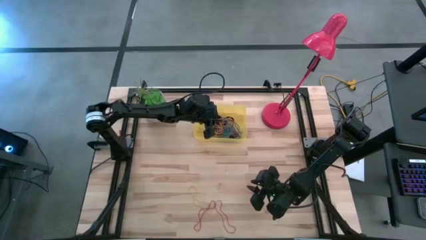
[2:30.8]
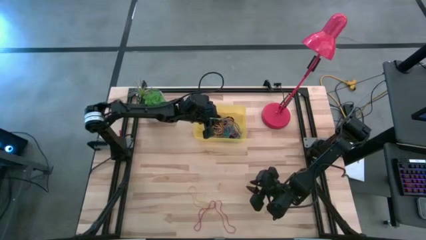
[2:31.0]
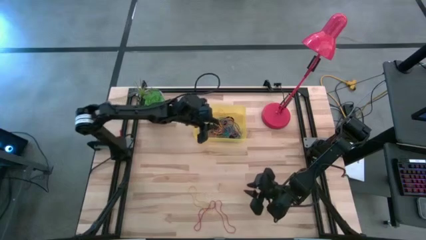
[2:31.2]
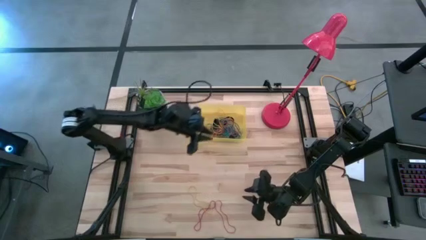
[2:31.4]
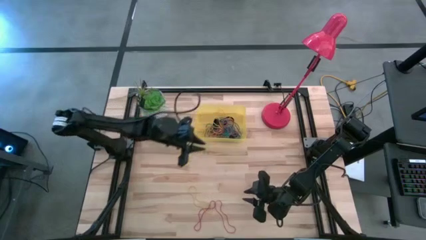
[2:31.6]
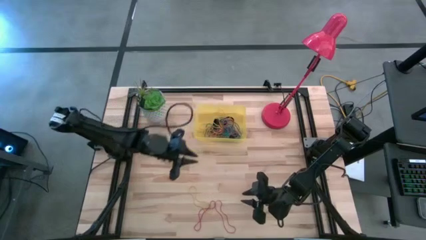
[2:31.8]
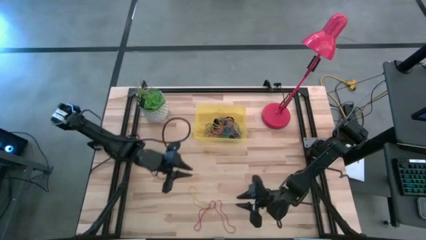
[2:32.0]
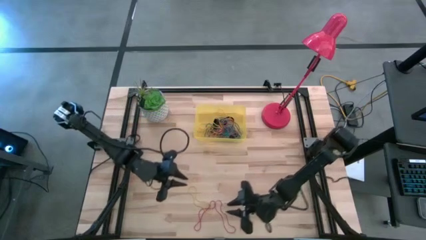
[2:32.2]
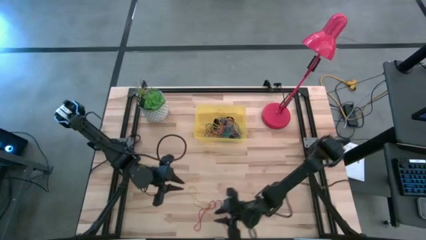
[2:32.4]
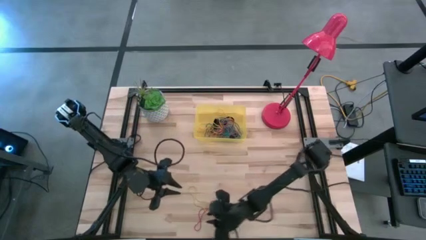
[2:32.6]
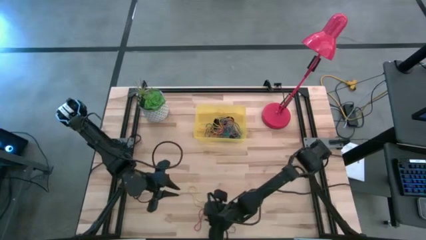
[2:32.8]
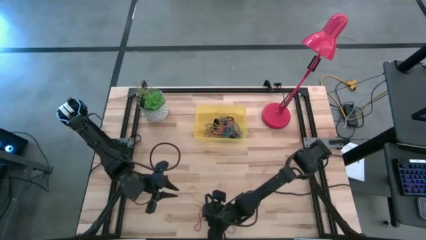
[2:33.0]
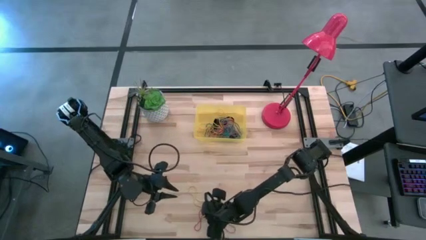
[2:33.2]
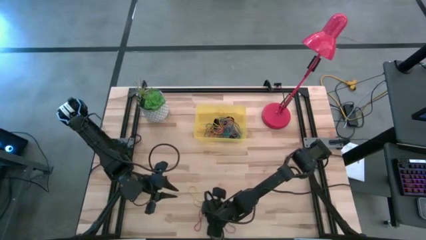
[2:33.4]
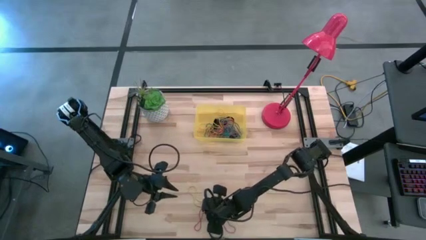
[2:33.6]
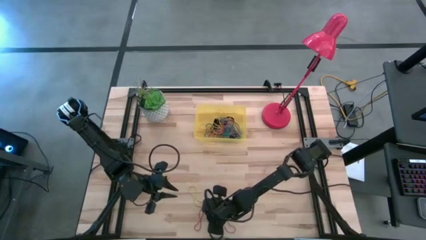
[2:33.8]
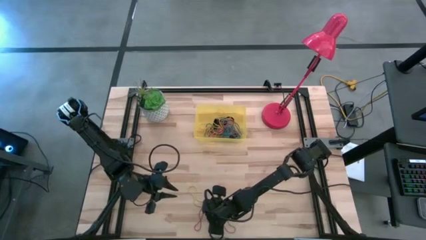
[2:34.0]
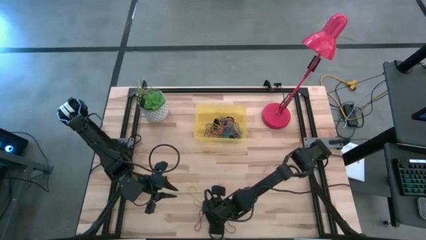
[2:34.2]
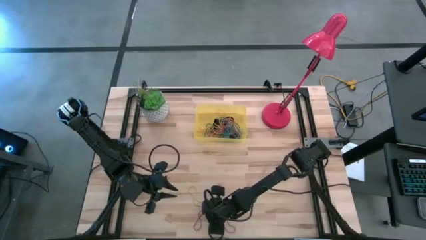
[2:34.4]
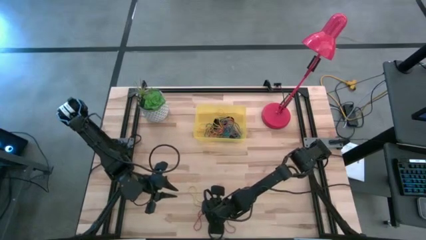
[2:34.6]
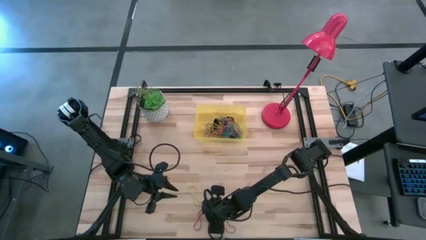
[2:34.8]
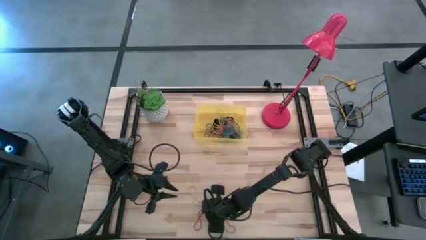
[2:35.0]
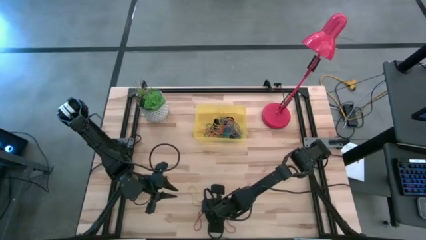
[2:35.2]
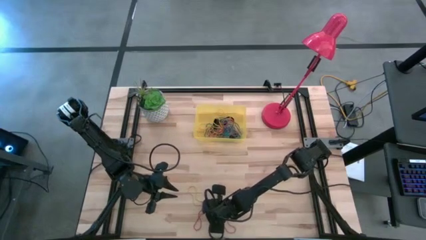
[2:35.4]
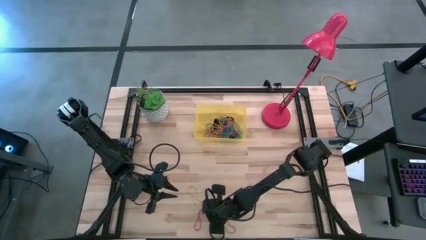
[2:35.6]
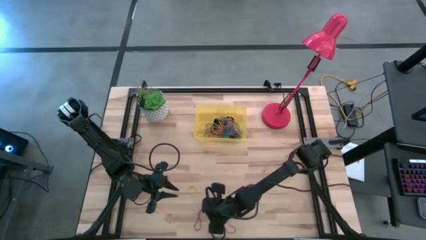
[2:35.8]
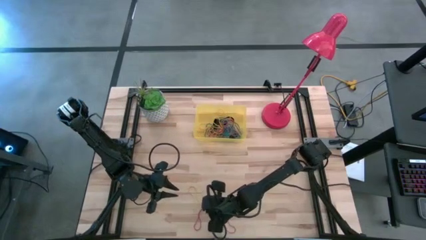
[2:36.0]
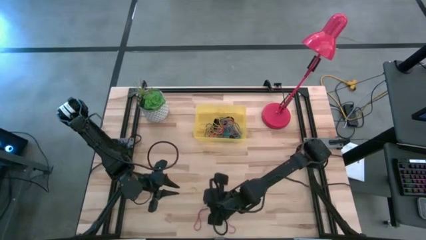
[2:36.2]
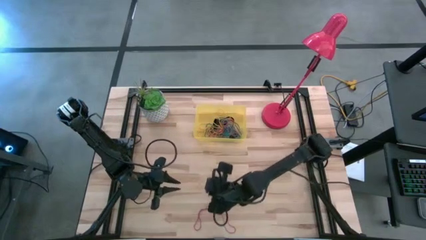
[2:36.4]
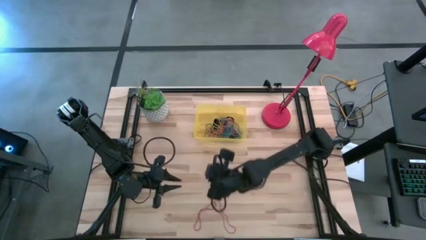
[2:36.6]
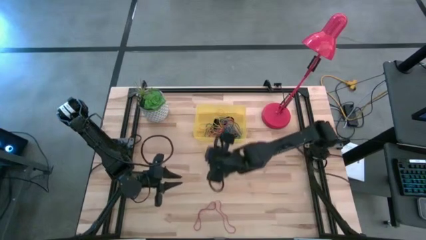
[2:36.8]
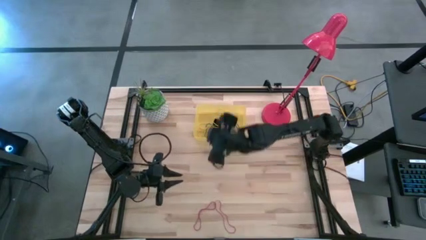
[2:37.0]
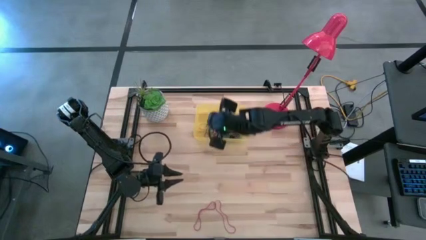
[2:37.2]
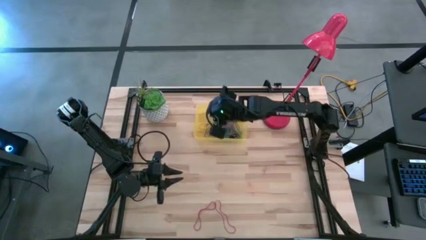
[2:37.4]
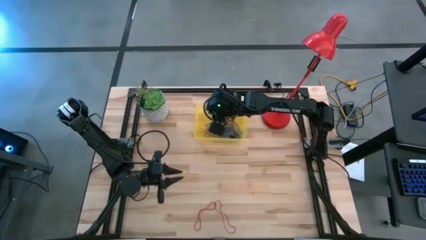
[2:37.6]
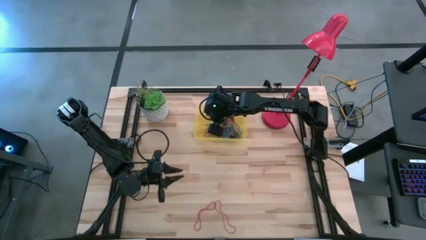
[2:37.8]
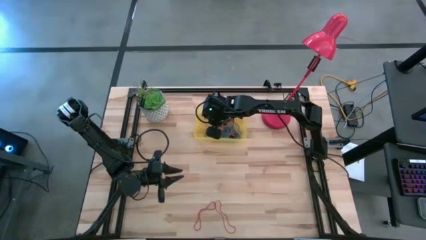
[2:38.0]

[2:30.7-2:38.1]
Task: Pick and place rubber bands into bin
Put the yellow rubber band into the yellow bin

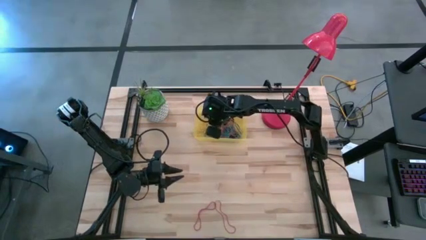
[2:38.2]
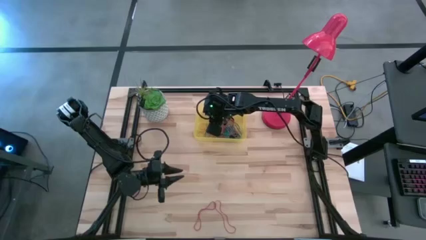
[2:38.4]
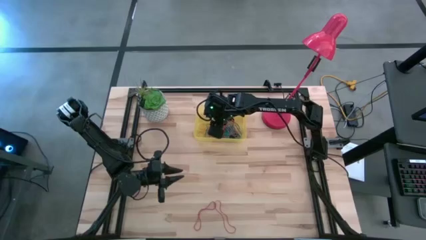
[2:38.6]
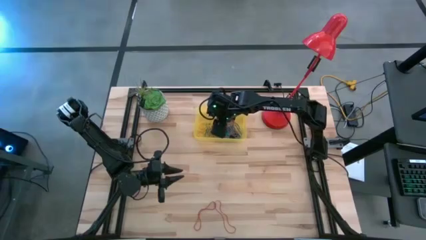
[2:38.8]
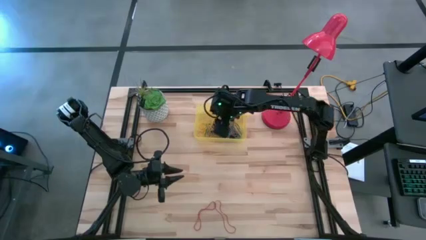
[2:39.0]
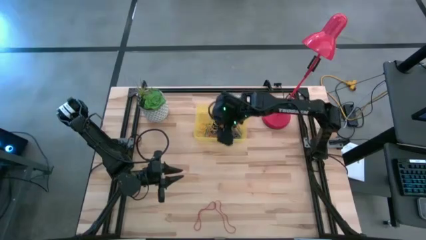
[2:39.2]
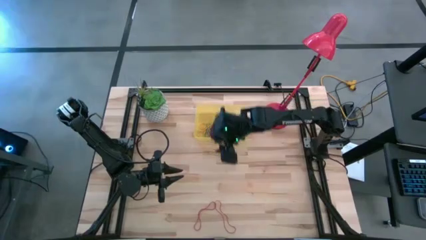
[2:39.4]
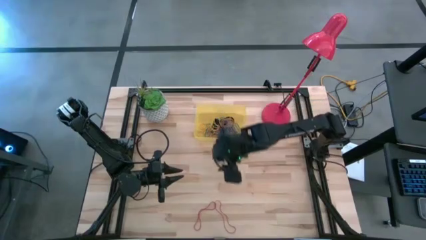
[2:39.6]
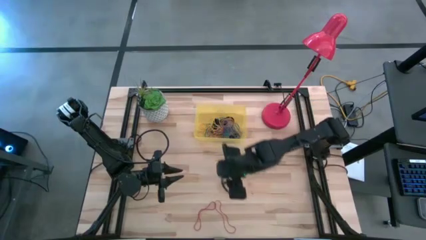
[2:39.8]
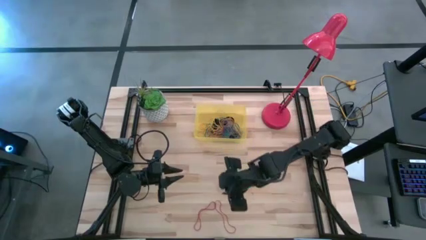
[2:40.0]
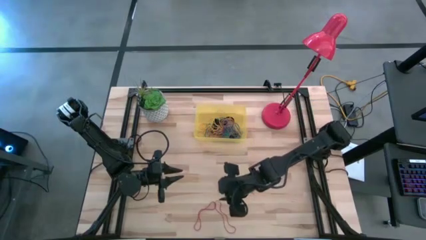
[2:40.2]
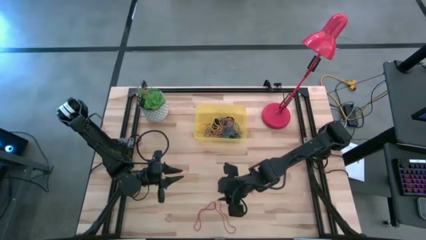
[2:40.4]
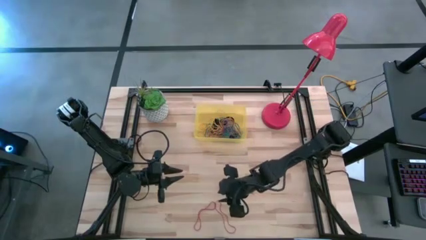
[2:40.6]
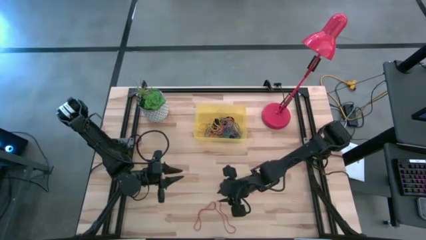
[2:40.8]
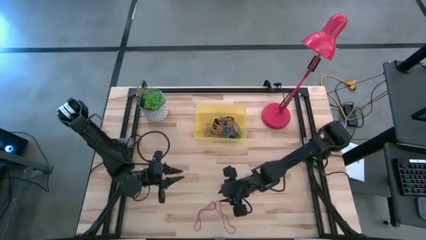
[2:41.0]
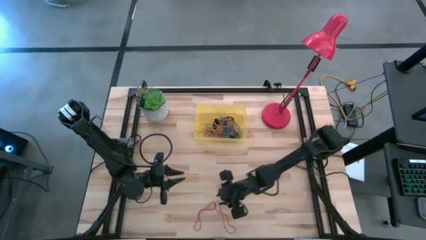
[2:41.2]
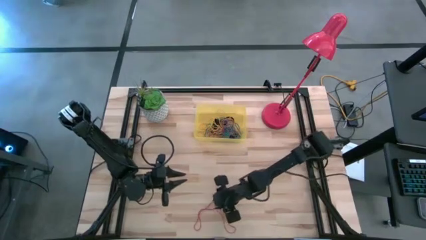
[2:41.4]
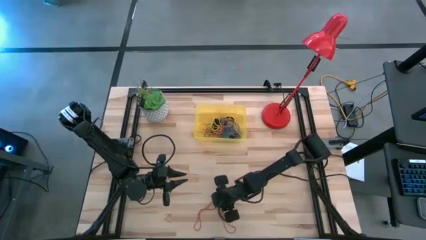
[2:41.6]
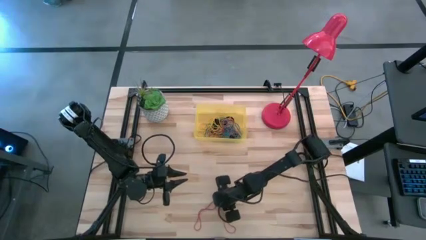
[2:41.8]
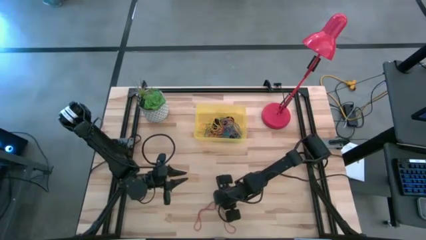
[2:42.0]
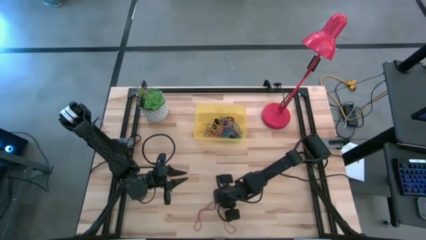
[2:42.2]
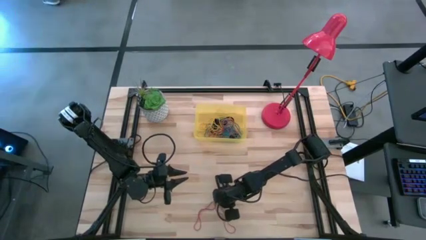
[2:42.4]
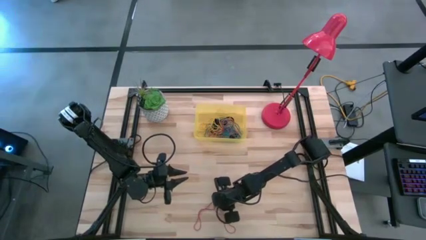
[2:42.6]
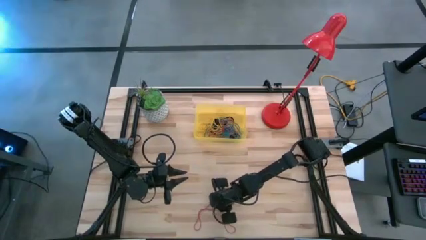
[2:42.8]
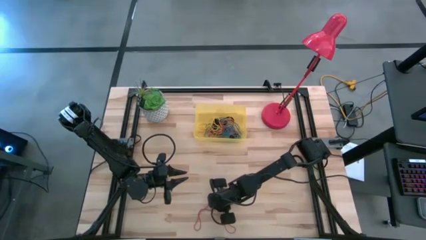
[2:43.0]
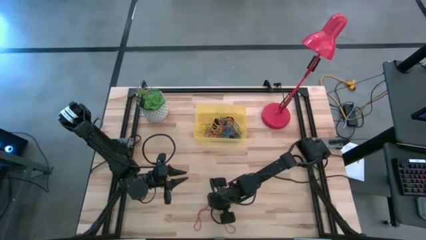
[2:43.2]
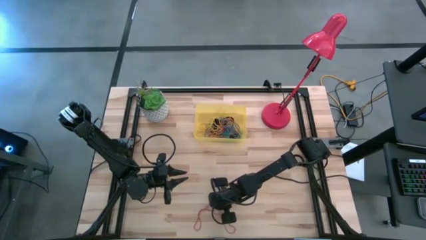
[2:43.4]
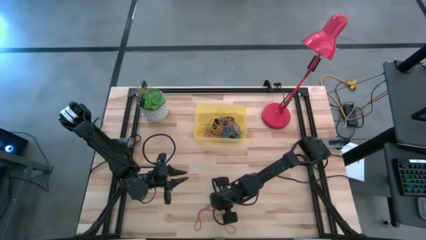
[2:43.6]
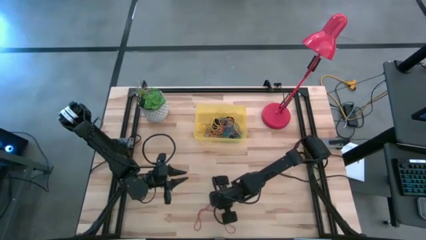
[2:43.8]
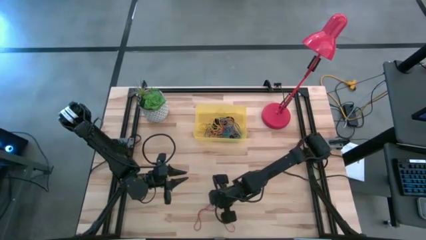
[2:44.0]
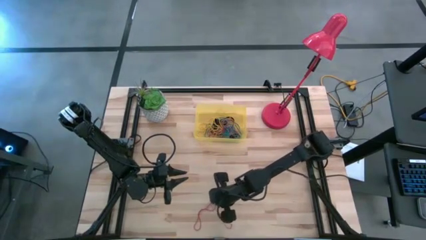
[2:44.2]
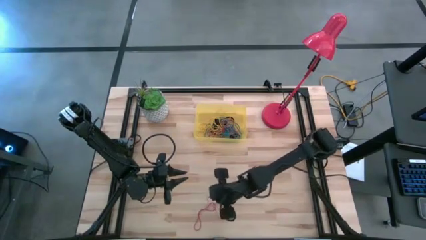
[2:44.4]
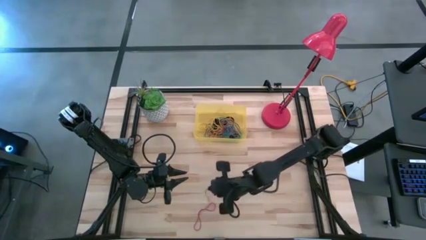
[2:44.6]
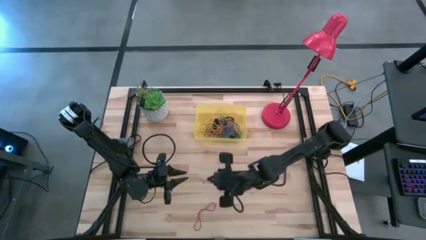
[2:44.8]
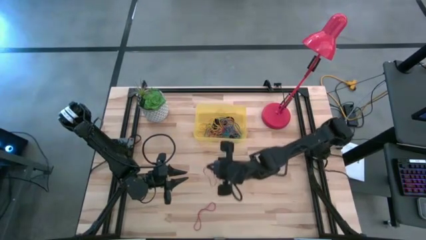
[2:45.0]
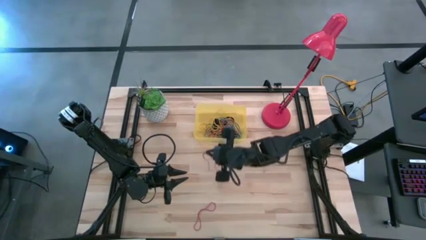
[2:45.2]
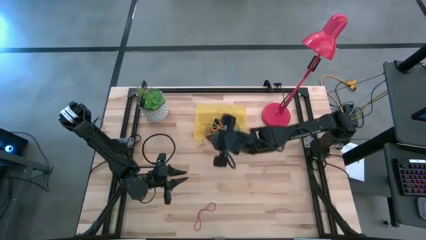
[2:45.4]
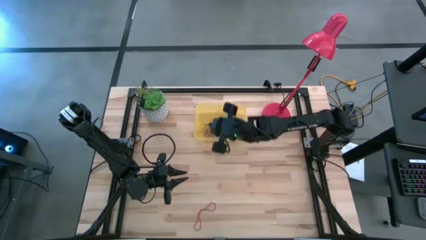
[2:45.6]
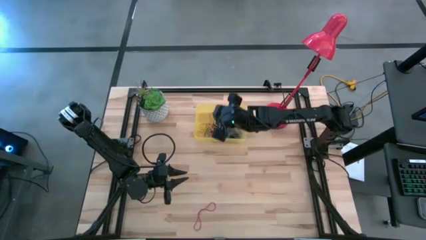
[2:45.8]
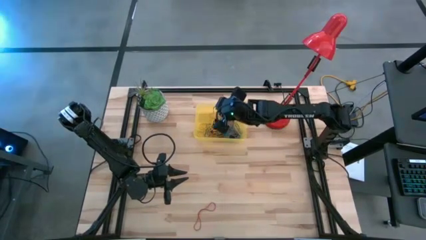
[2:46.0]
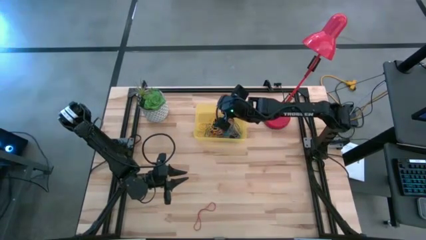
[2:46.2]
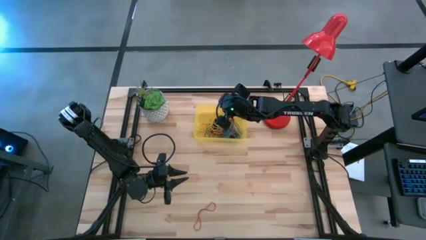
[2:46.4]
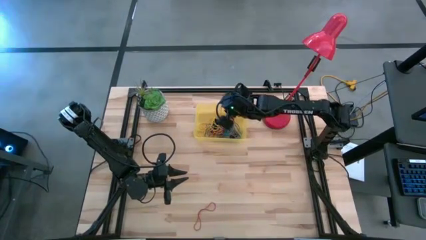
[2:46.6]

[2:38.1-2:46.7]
Put the red rubber band into the yellow bin
